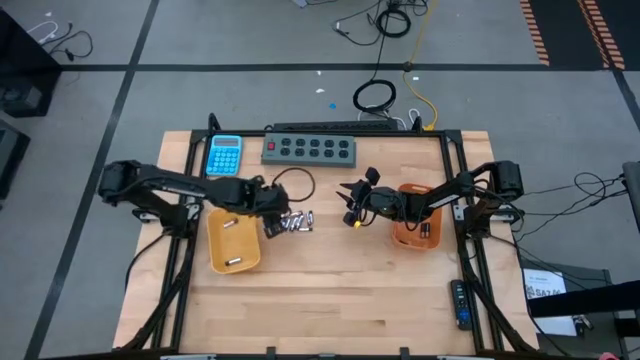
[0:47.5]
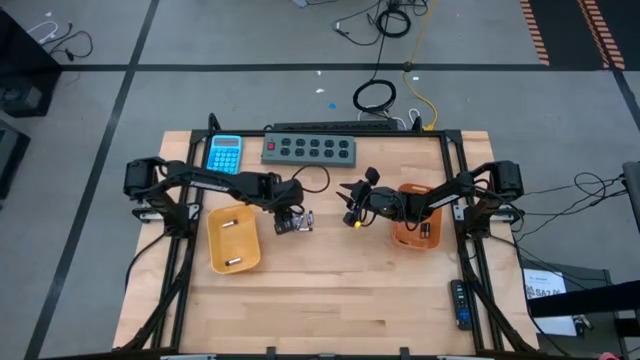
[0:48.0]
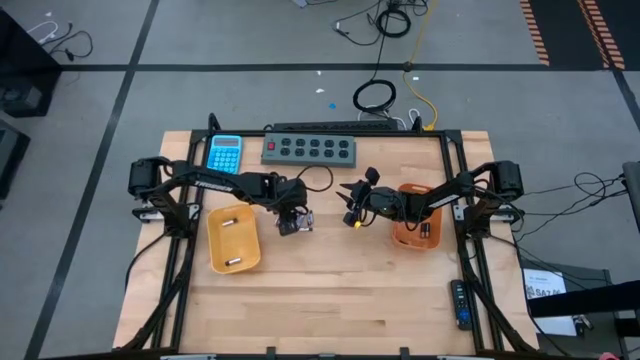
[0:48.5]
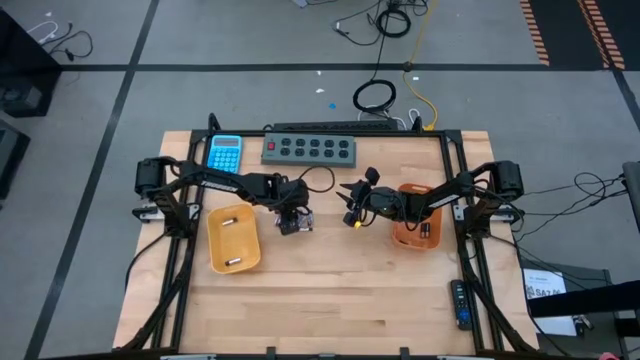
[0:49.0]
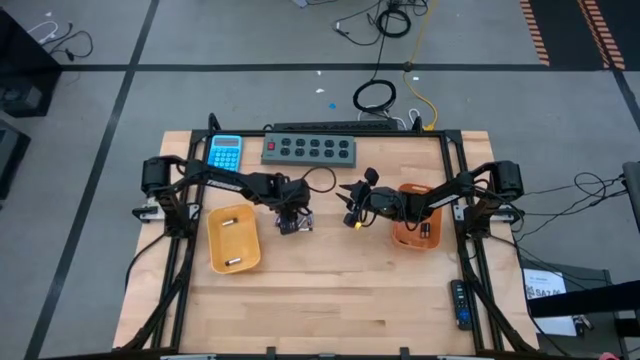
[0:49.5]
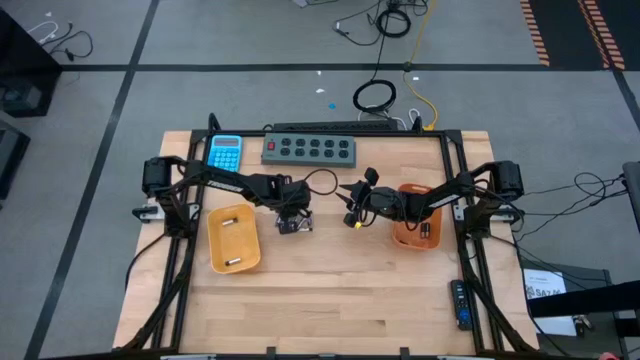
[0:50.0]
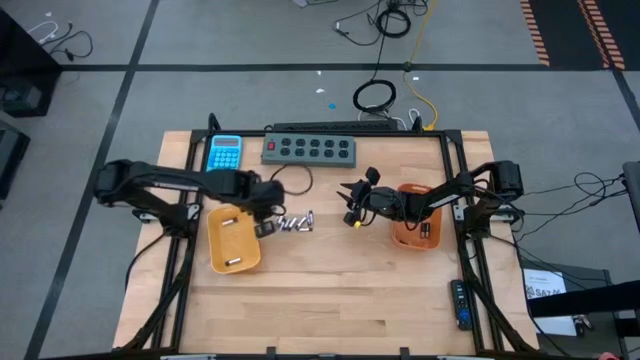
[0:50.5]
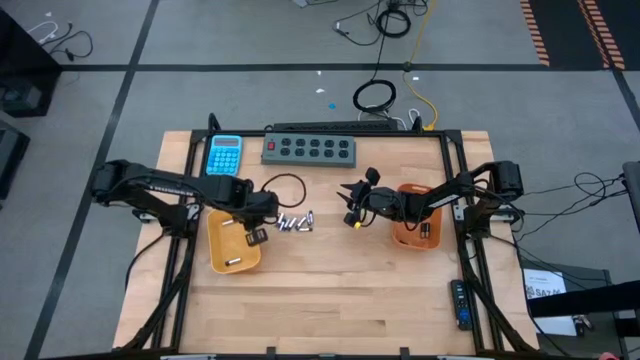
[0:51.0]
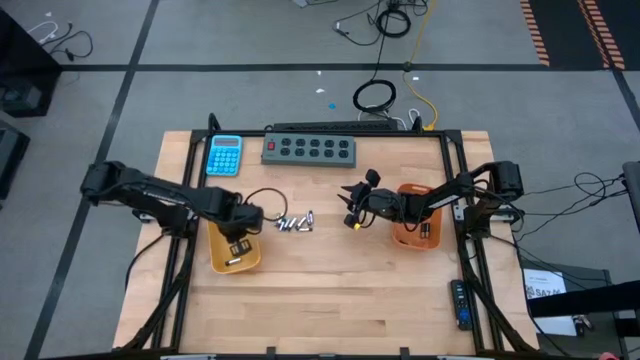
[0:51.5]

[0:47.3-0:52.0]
Task: Sort batteries
Put the white battery into the yellow bin

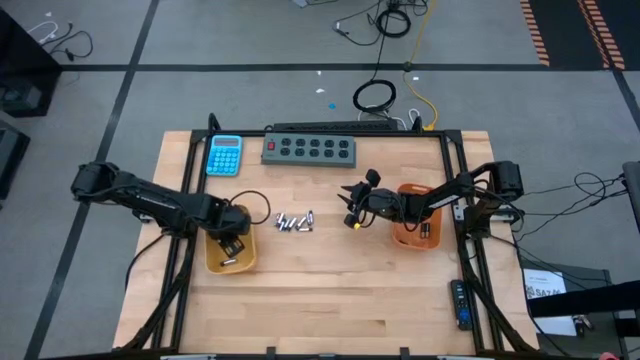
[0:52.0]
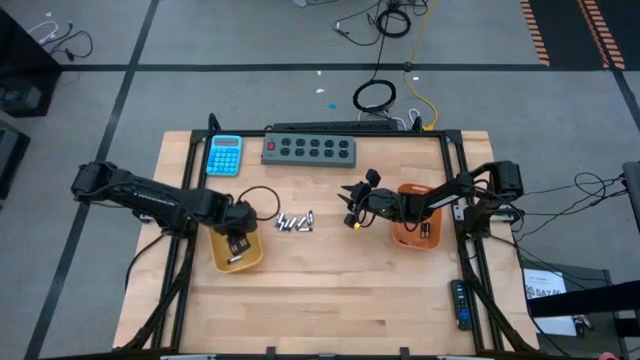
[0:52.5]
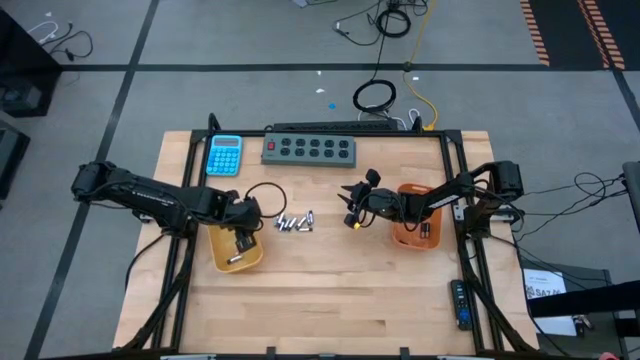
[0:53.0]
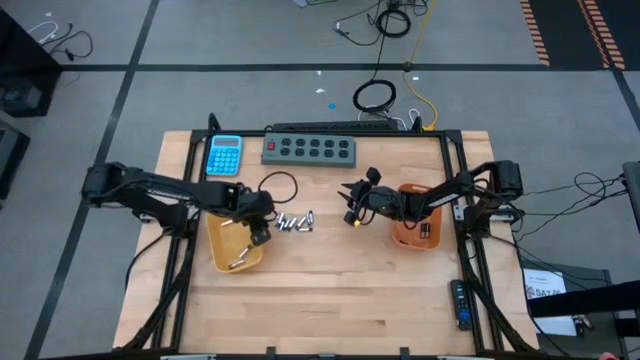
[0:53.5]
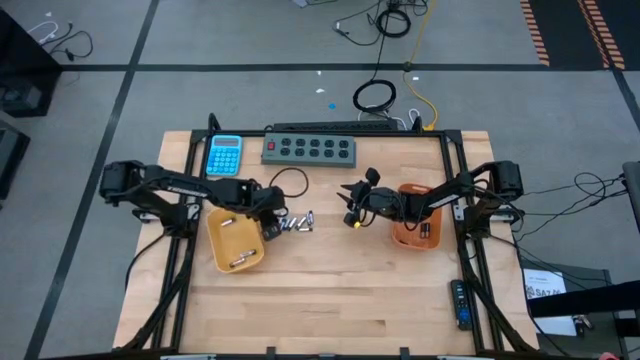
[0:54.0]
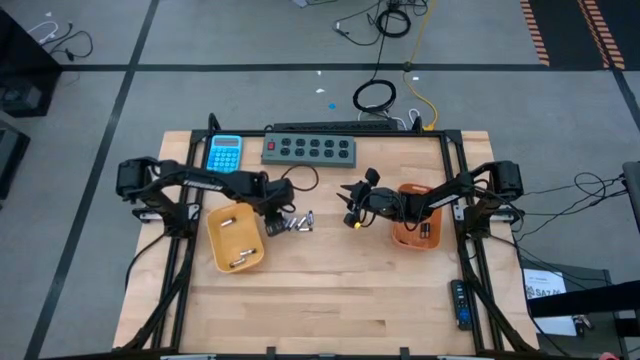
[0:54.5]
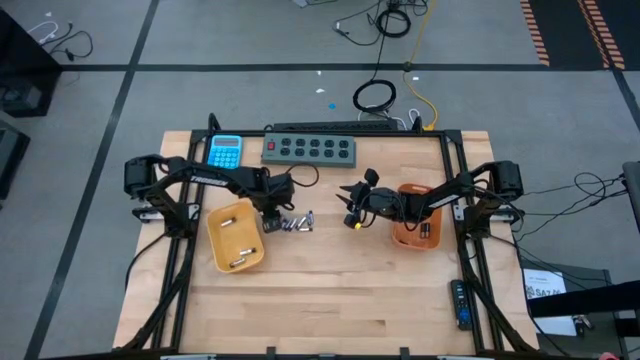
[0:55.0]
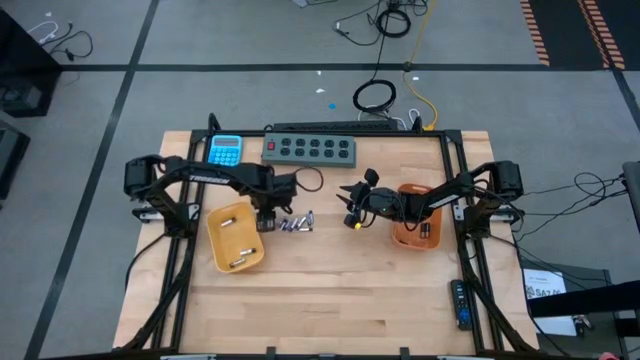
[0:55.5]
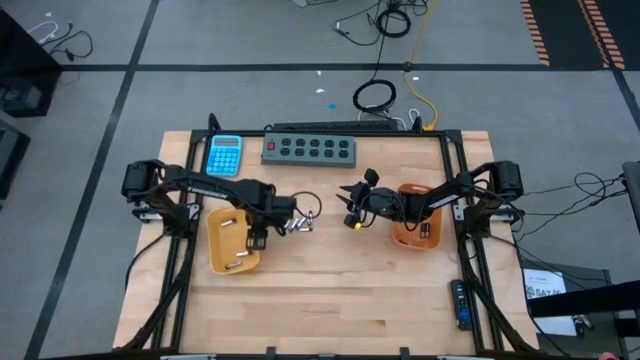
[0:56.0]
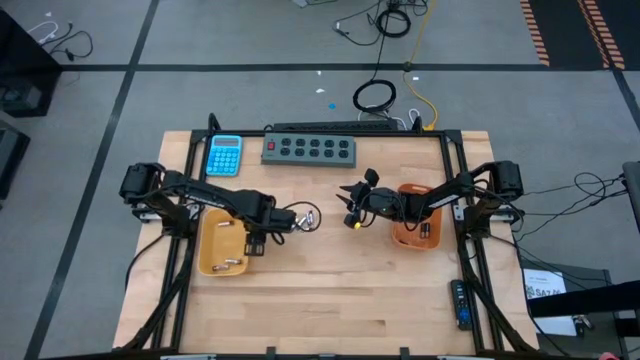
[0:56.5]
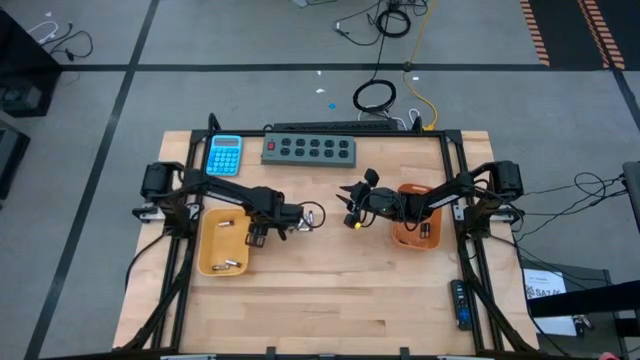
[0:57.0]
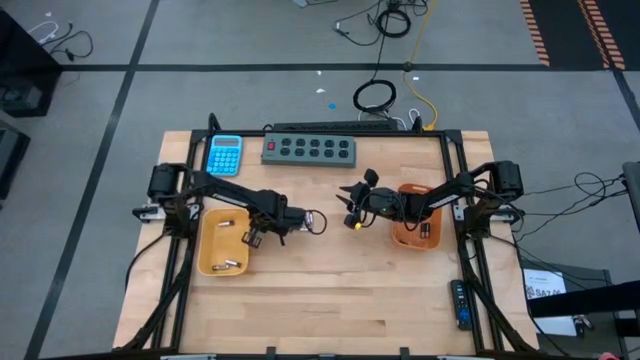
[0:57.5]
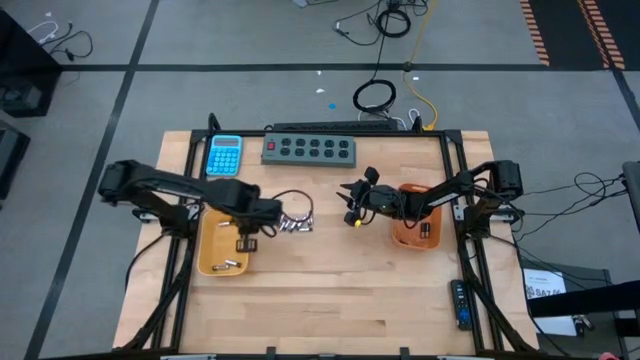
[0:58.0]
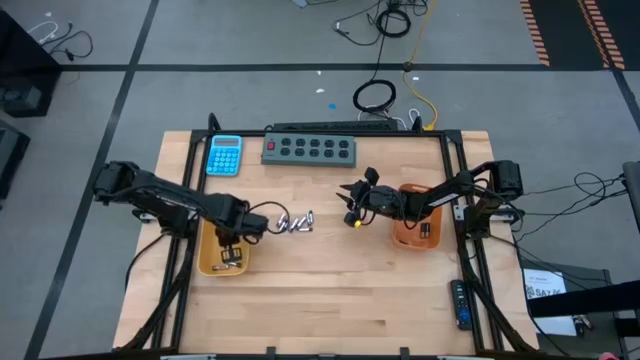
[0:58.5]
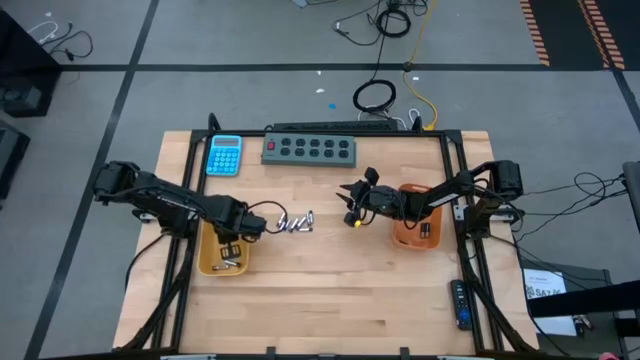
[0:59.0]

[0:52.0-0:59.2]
Put the white battery into the yellow bin

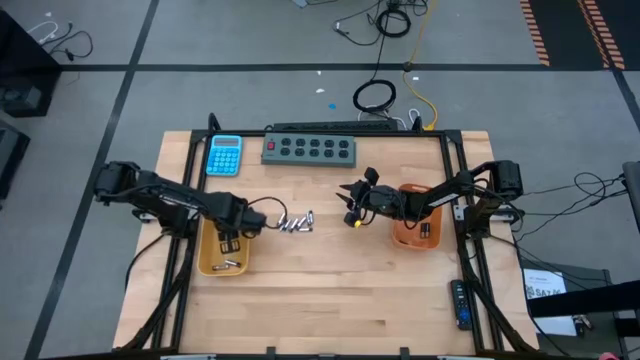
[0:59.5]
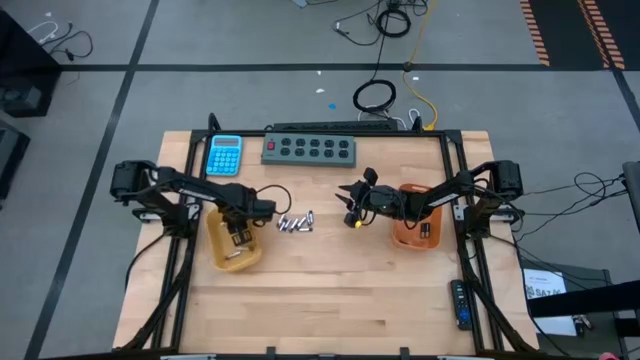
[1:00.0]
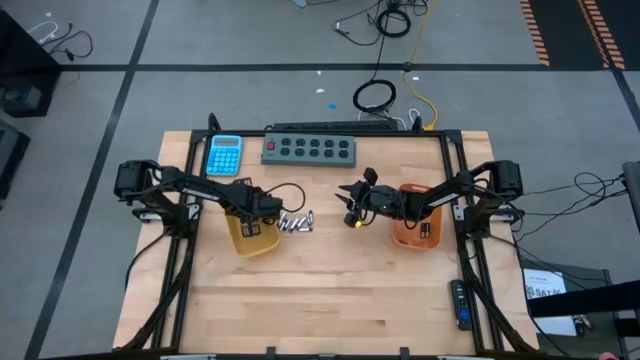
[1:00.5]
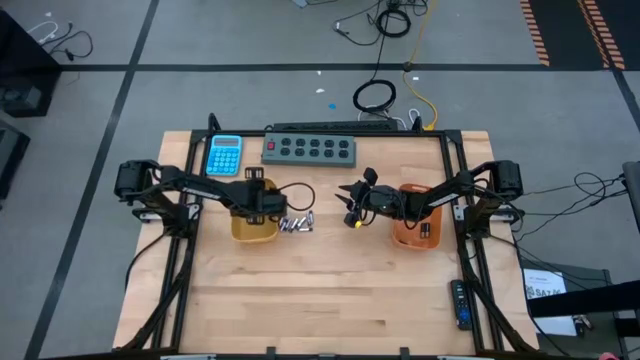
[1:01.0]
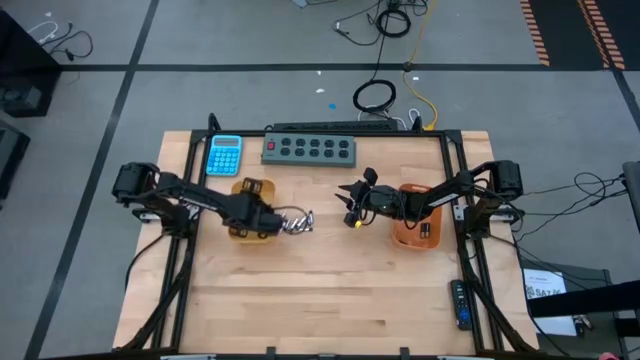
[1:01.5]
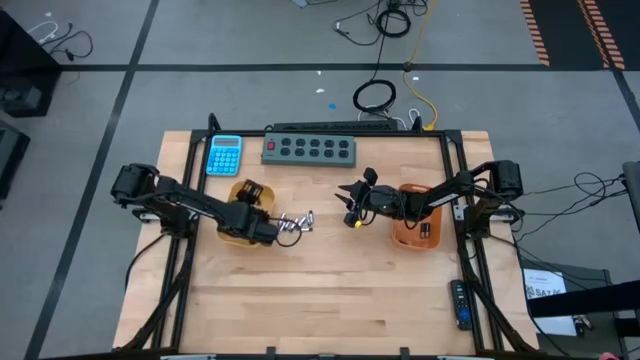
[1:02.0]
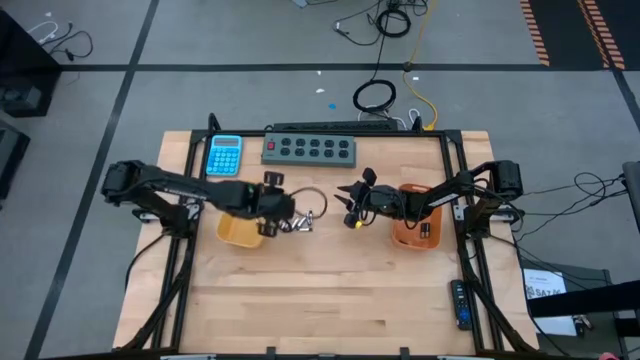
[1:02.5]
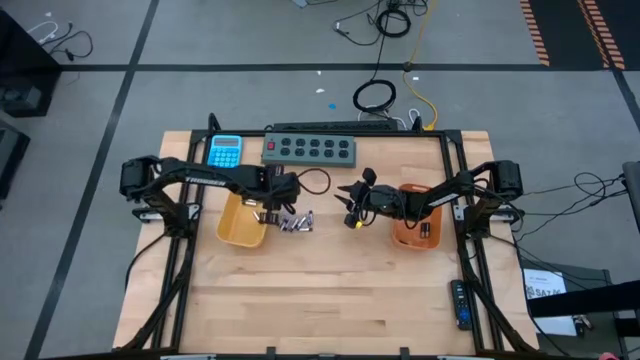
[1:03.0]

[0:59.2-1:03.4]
Adjust the yellow bin

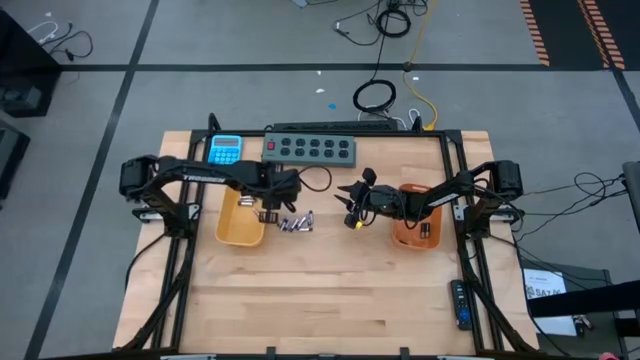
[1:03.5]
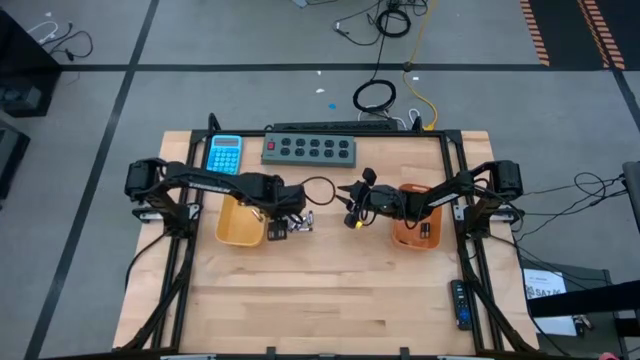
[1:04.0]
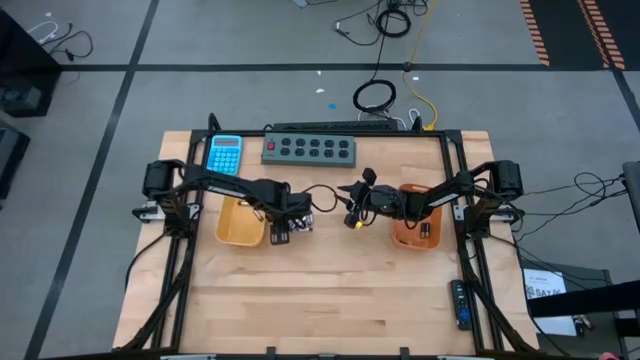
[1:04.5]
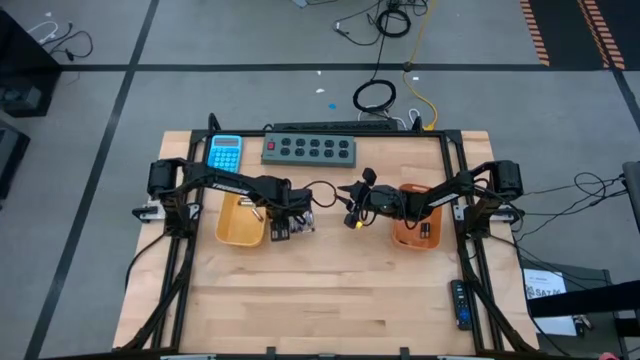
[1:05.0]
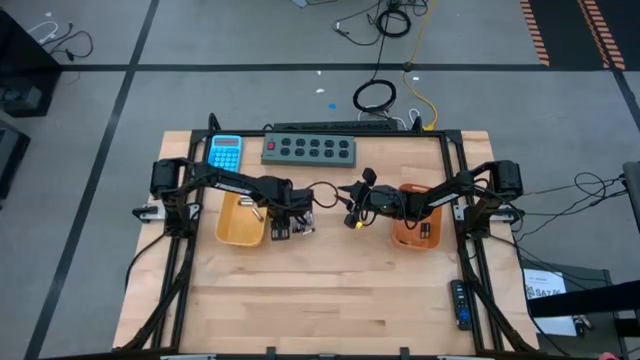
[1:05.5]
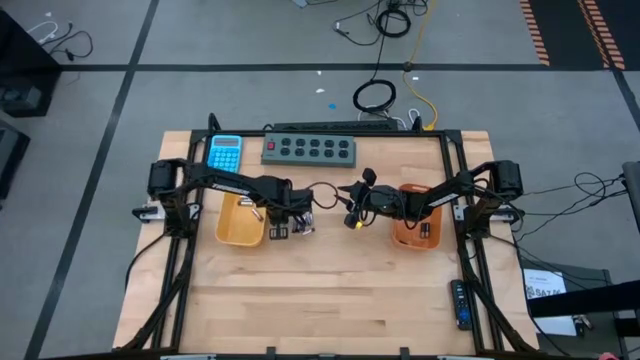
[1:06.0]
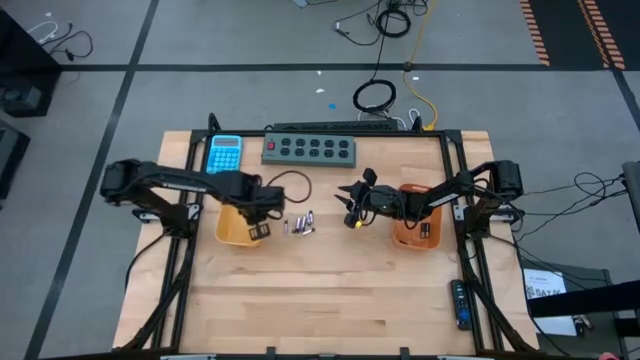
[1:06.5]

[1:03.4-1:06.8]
Put the white battery into the yellow bin

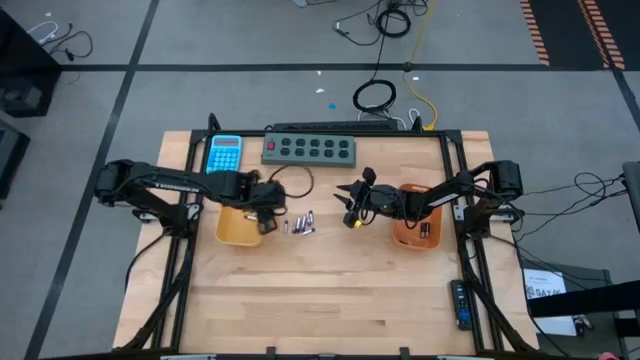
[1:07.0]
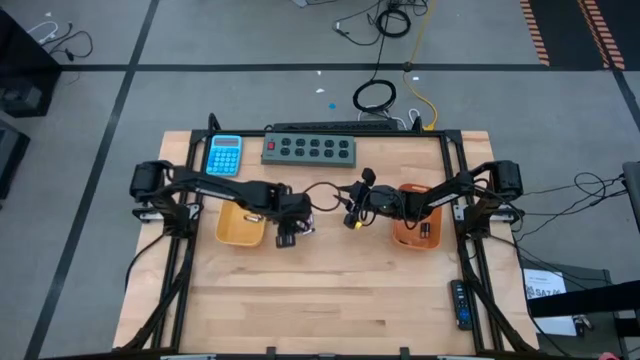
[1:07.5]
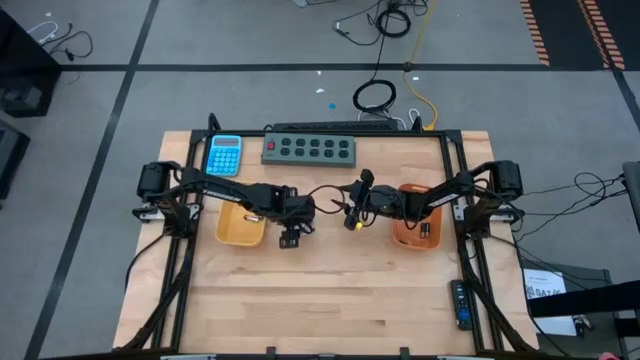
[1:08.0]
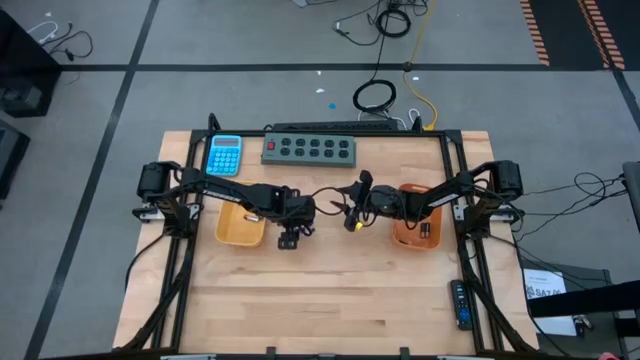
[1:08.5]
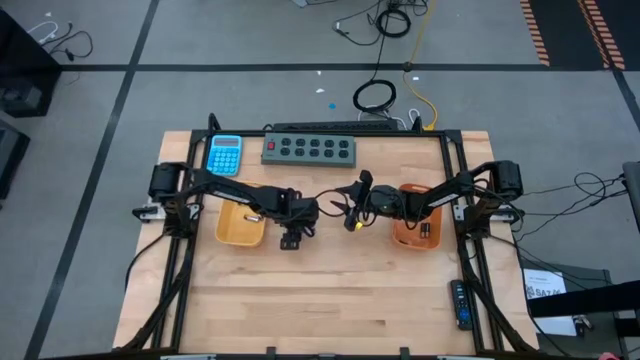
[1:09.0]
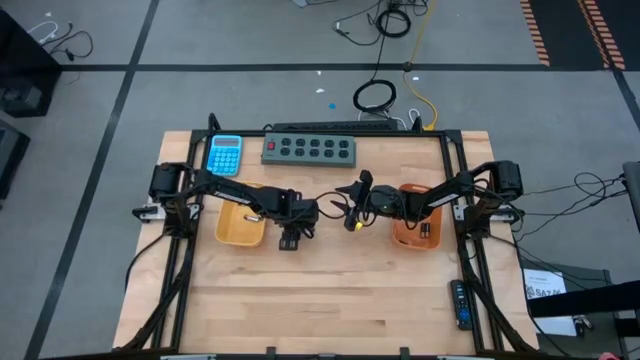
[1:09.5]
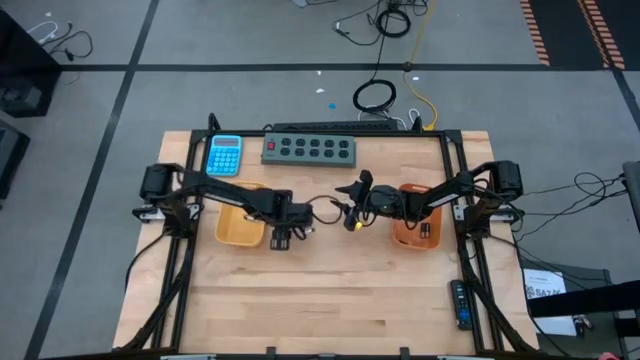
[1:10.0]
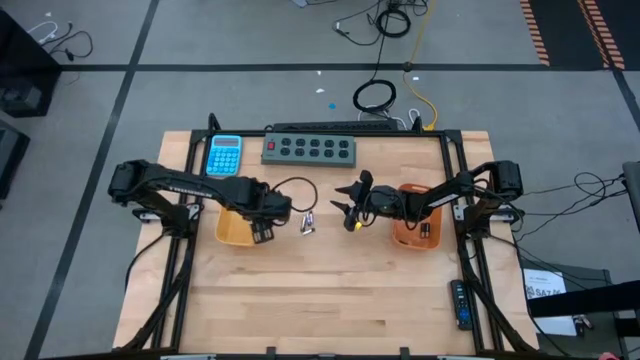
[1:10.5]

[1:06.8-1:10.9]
Put the white battery into the yellow bin
